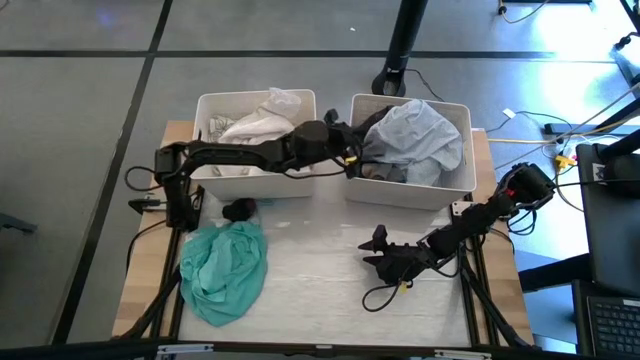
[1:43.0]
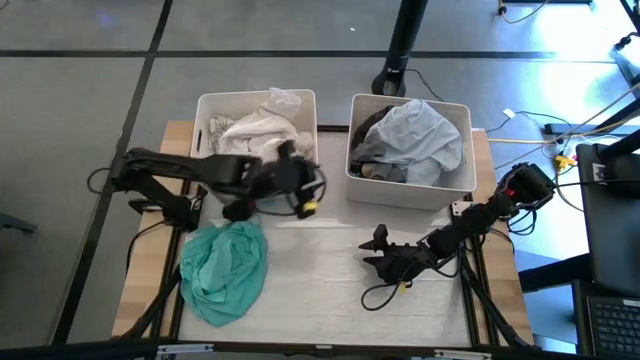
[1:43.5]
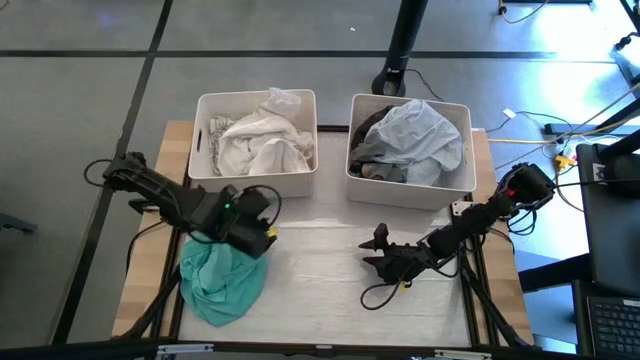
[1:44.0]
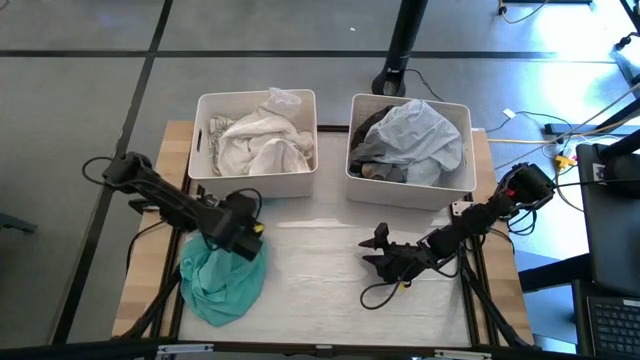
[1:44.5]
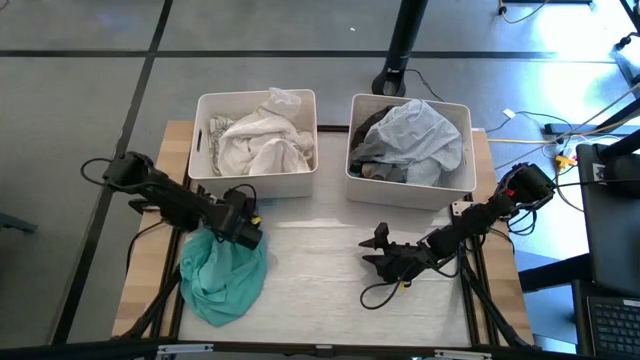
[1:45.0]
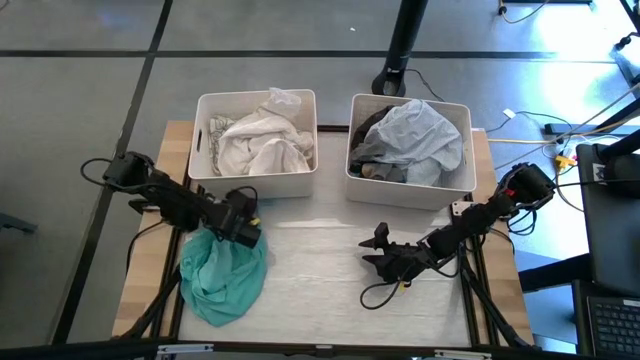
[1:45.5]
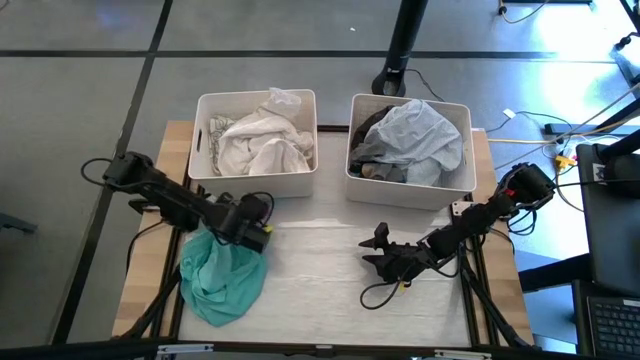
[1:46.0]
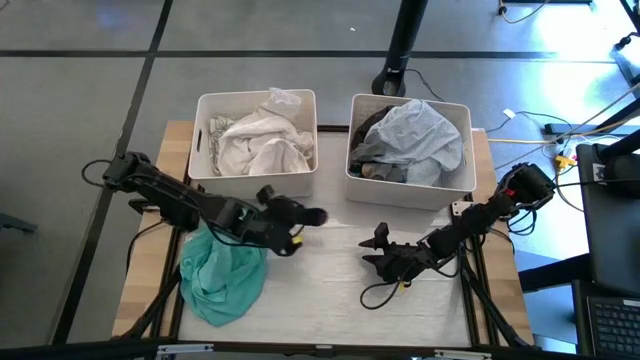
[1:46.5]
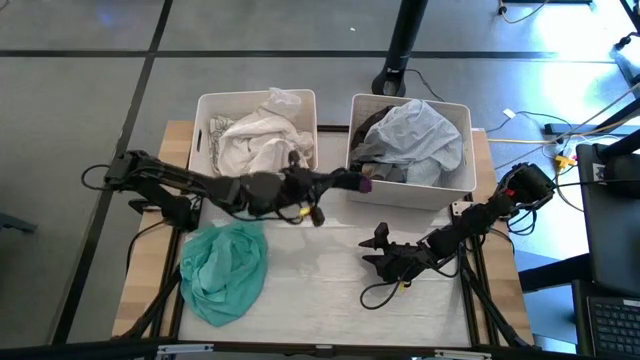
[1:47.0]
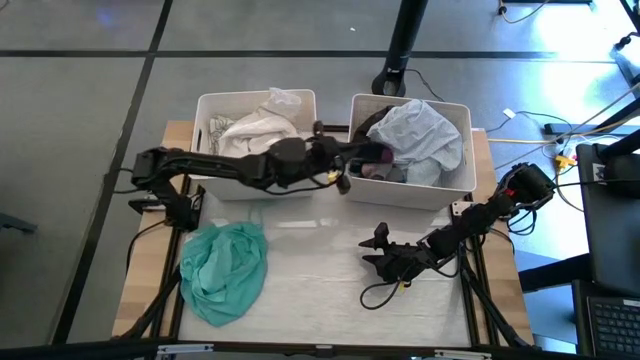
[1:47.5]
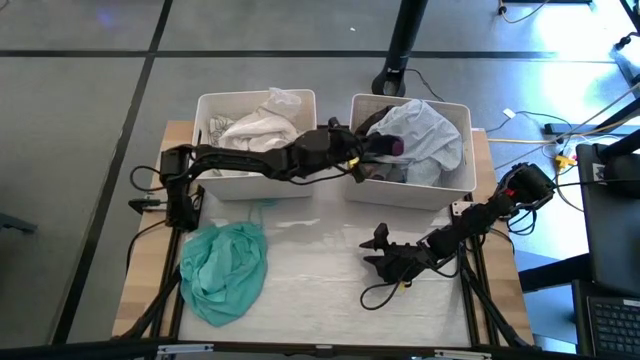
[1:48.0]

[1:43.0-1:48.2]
Task: Sort clothes
Put the dark blue sock into the right white bin

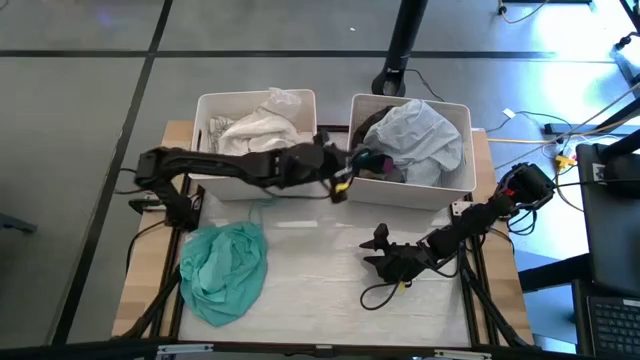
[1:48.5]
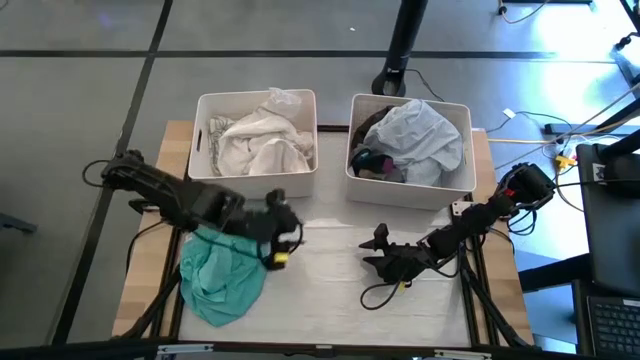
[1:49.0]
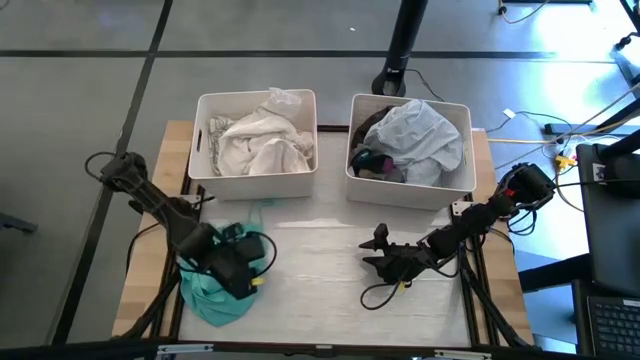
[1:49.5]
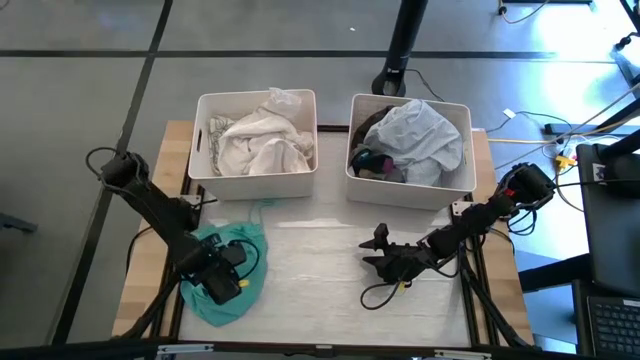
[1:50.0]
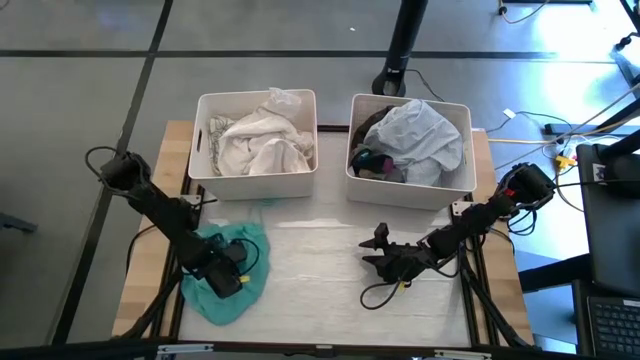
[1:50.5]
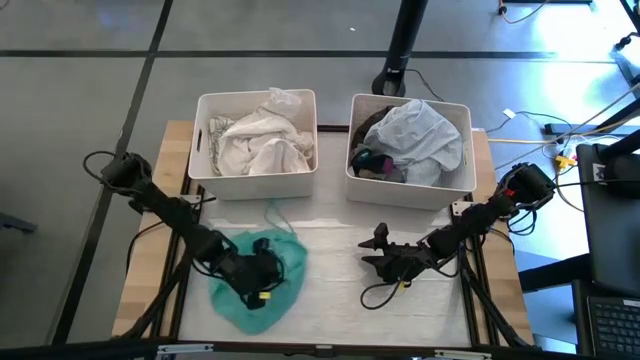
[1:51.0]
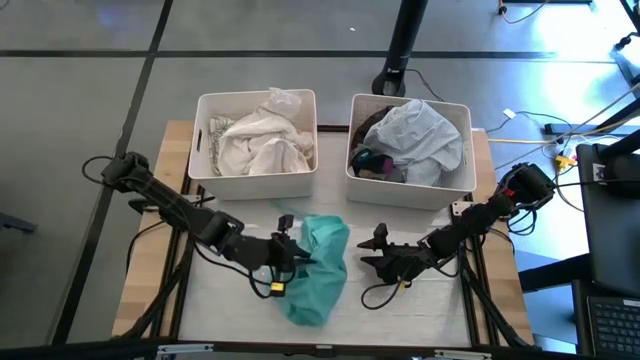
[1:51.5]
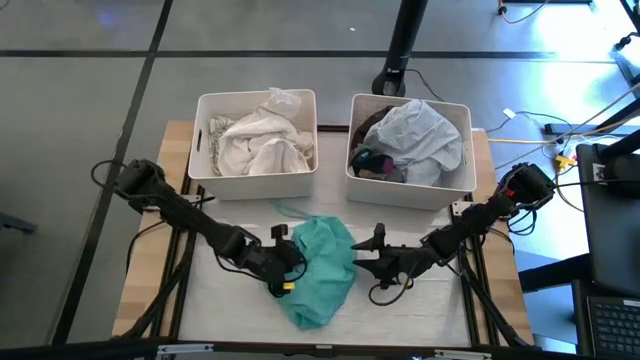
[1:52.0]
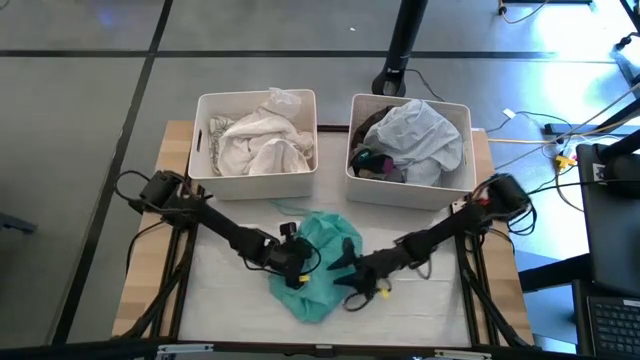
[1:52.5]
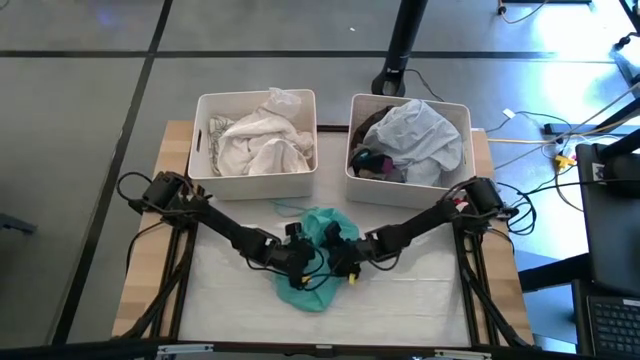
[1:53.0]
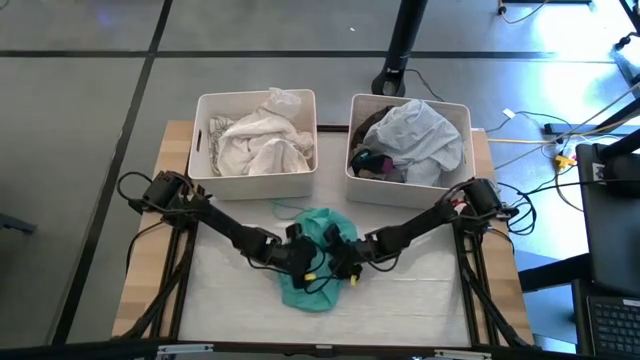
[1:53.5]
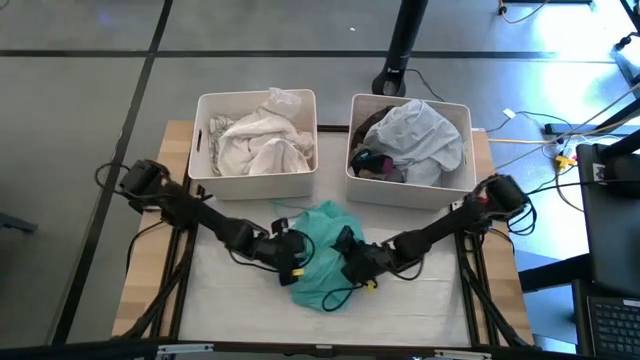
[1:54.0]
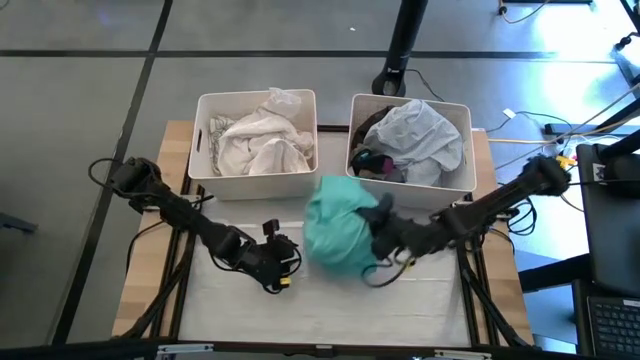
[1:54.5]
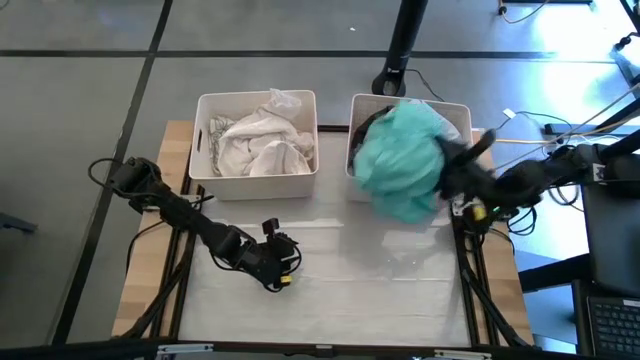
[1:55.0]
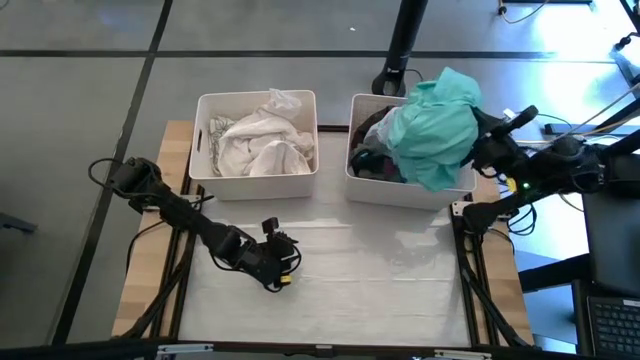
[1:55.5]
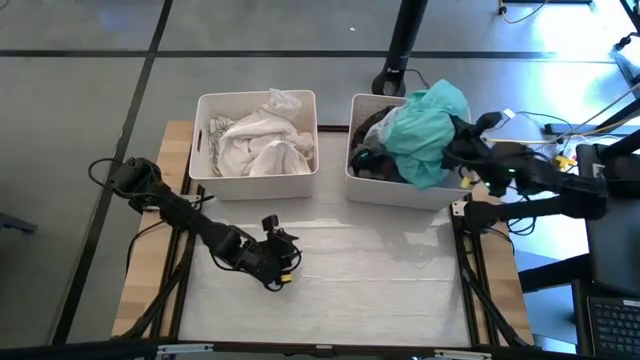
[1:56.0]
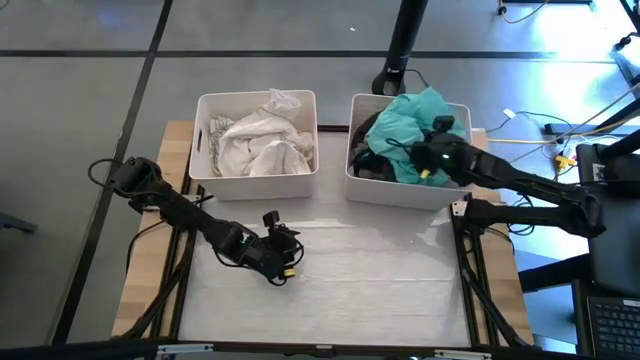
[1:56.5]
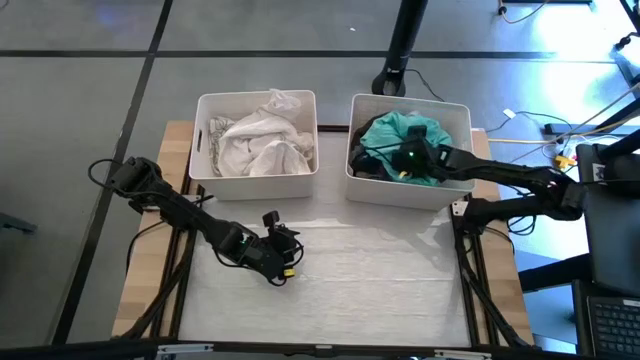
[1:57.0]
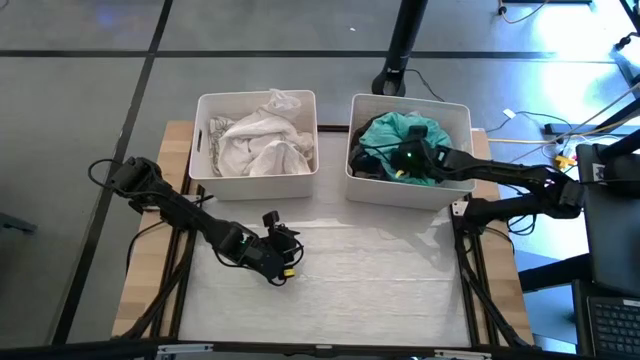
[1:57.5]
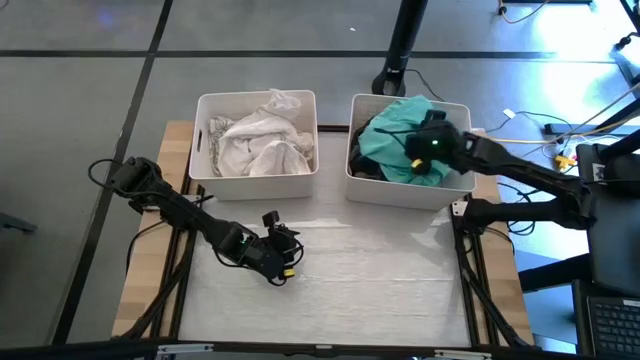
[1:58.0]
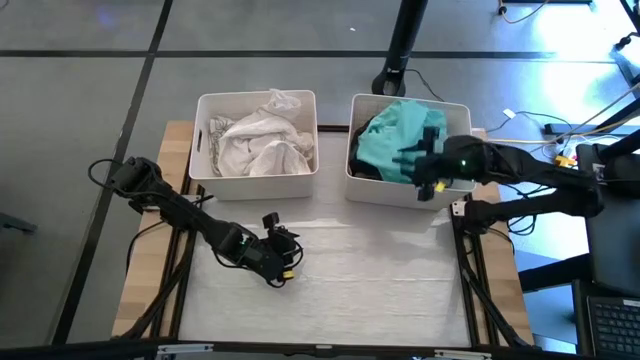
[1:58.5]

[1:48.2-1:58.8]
Put the light blue shirt into the right white bin

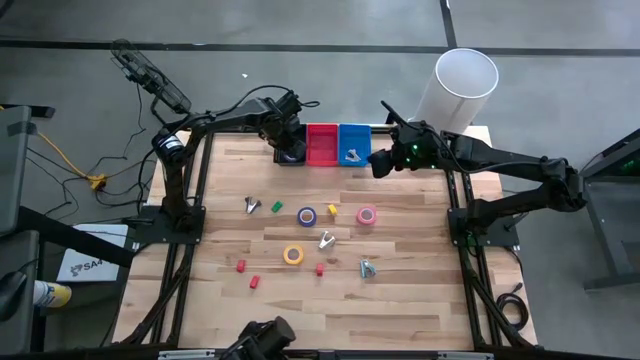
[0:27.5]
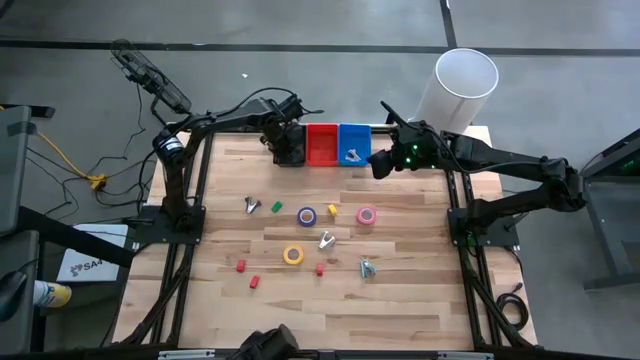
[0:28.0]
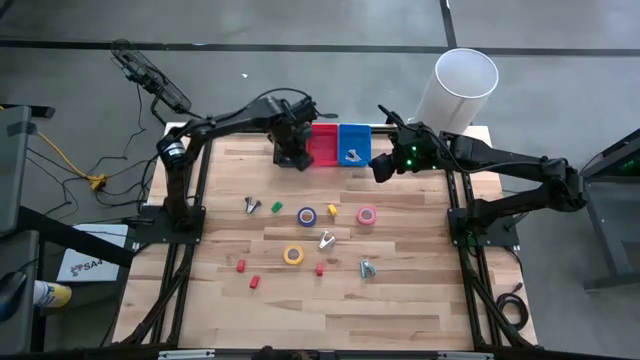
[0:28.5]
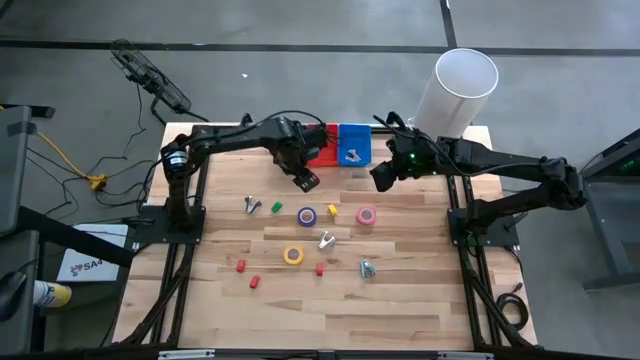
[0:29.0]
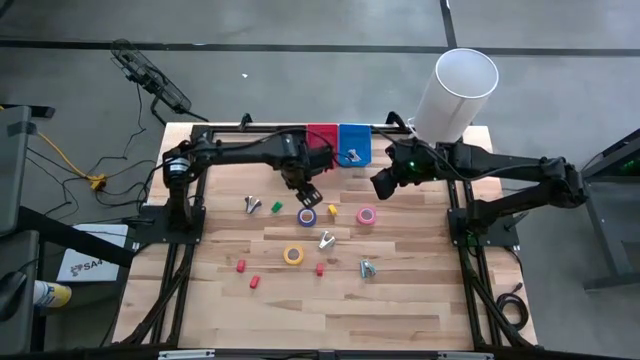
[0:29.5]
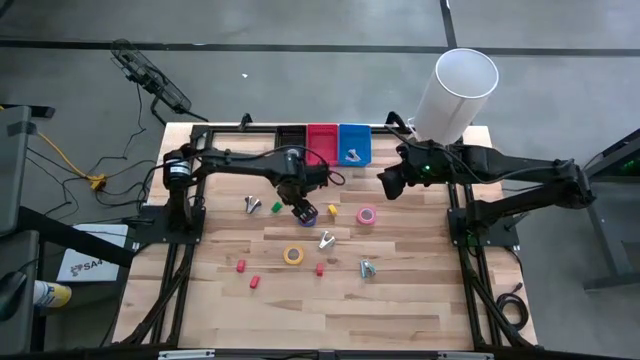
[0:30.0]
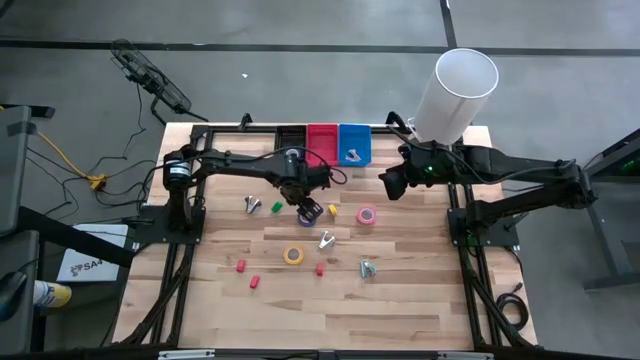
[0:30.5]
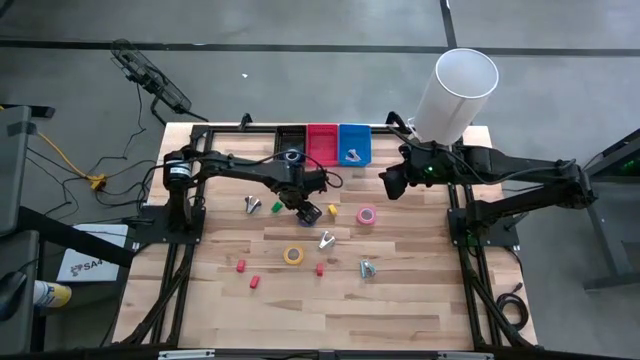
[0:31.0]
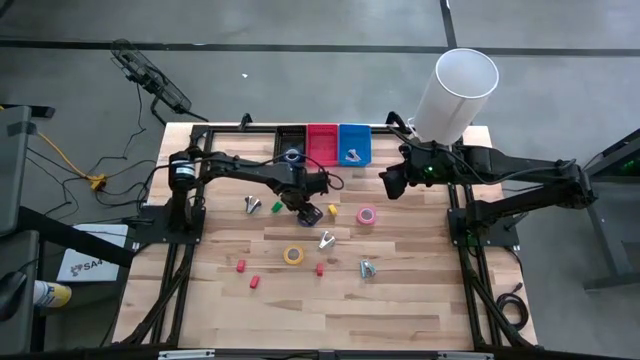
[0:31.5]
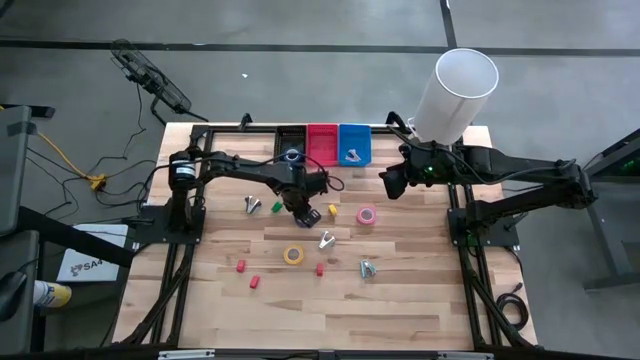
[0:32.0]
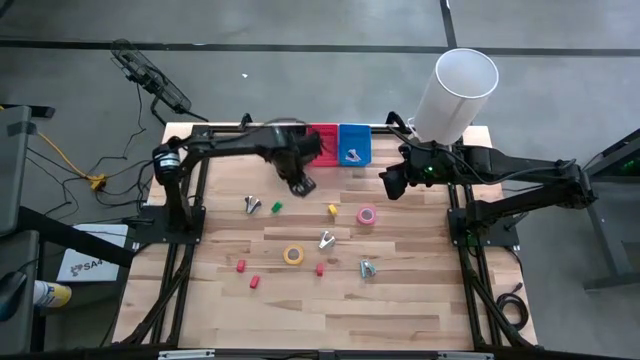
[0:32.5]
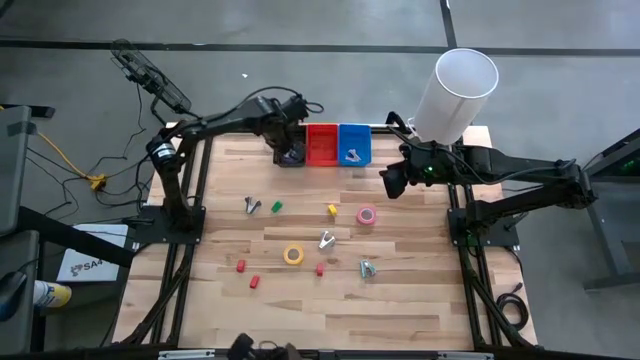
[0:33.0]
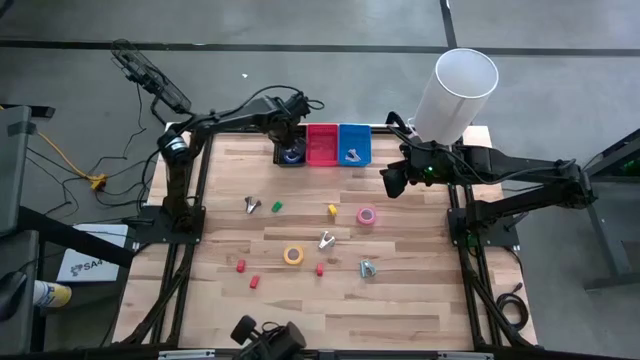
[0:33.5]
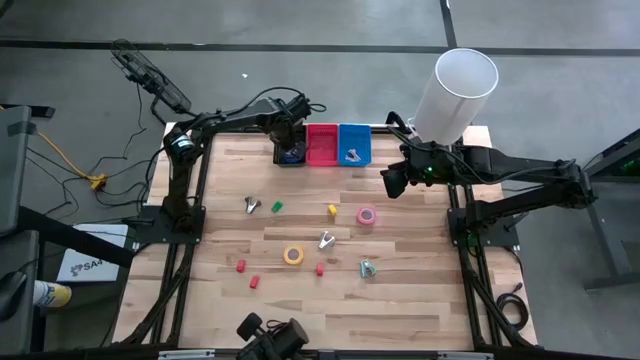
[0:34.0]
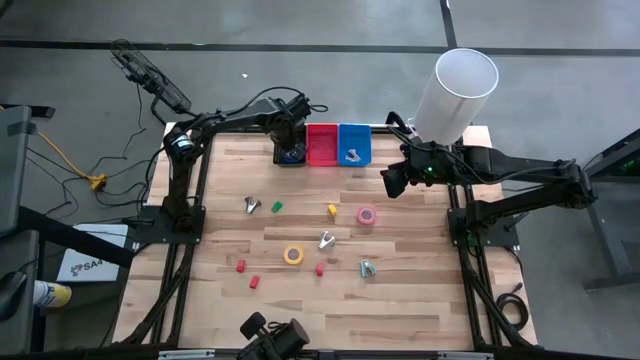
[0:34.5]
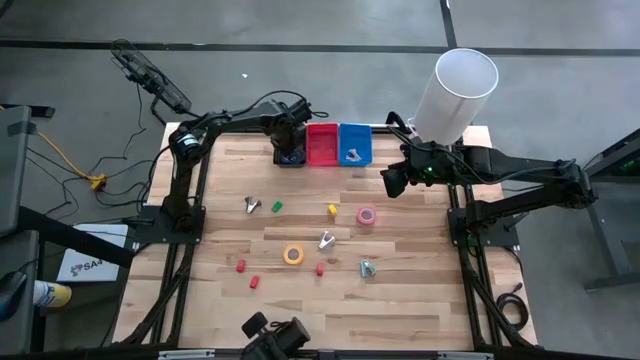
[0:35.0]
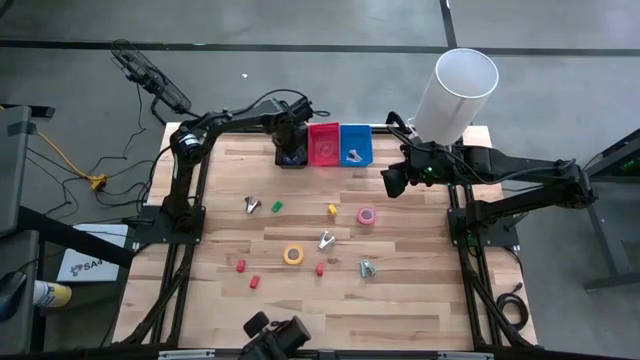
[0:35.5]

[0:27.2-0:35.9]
Task: Pick and place Stapler, Stapler remover, tape
Put the blue tape into the black bin
